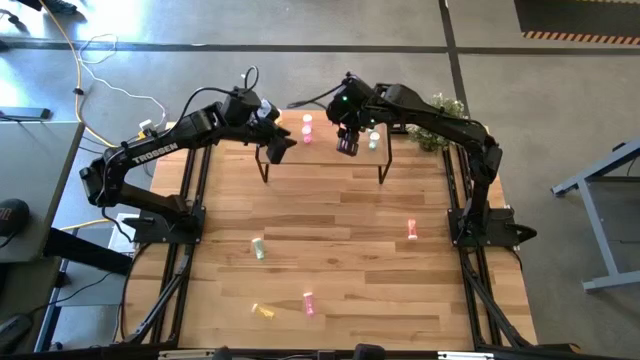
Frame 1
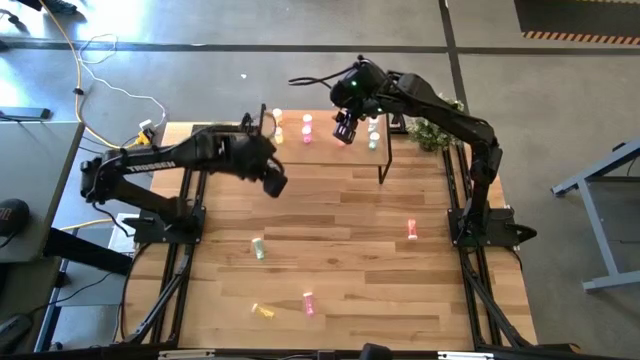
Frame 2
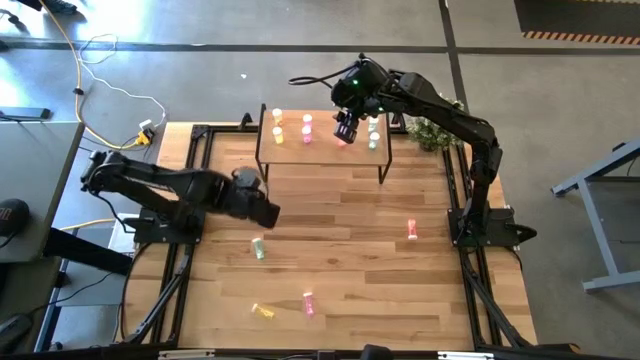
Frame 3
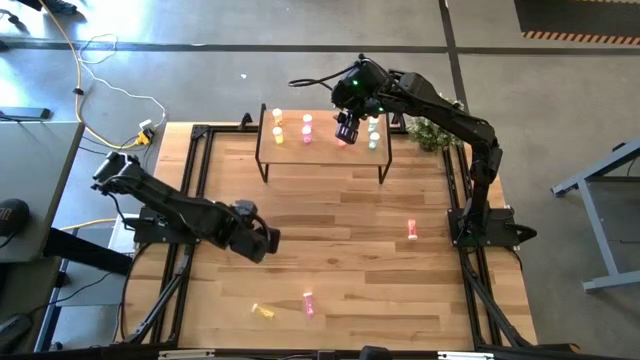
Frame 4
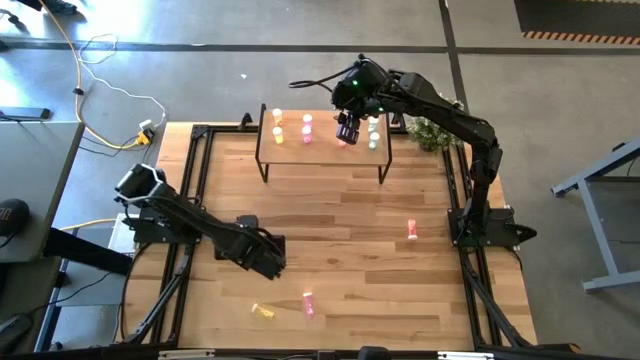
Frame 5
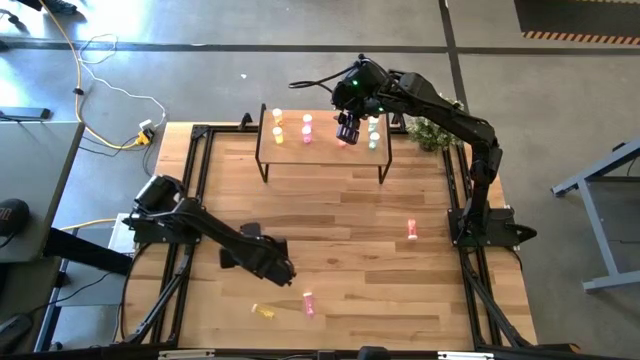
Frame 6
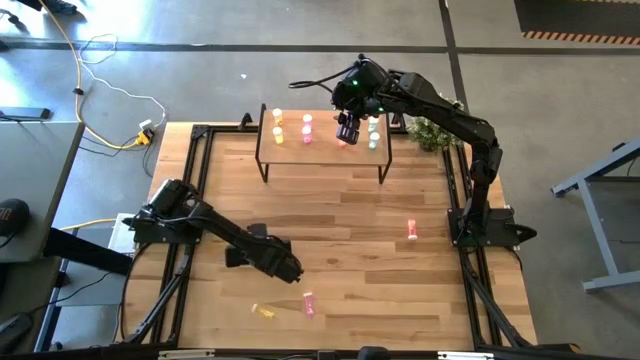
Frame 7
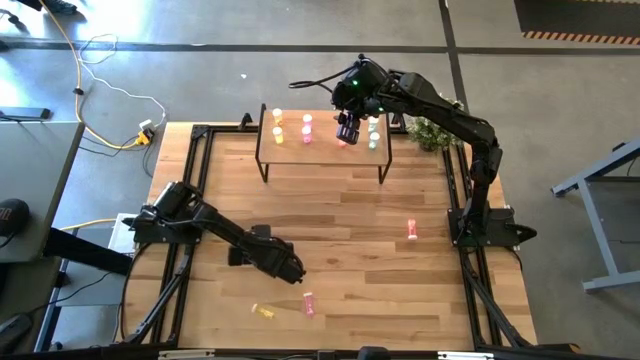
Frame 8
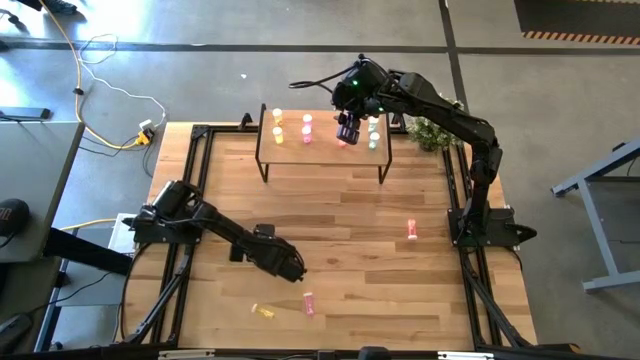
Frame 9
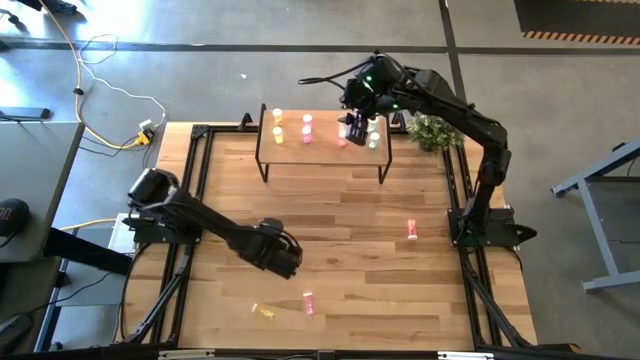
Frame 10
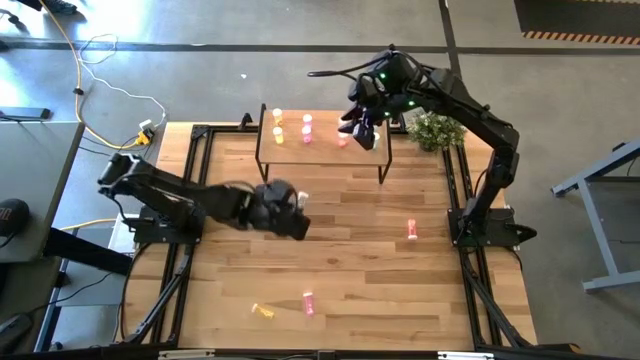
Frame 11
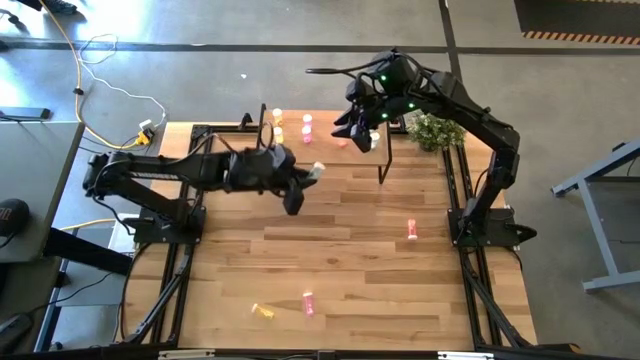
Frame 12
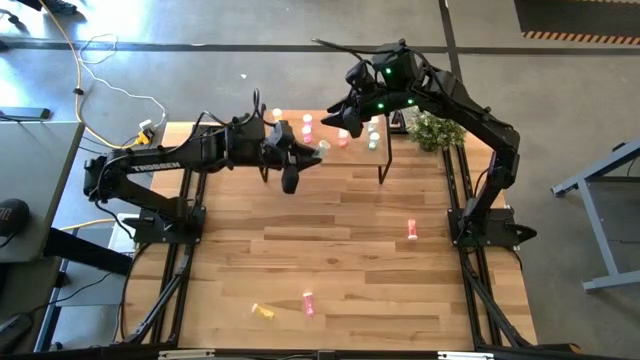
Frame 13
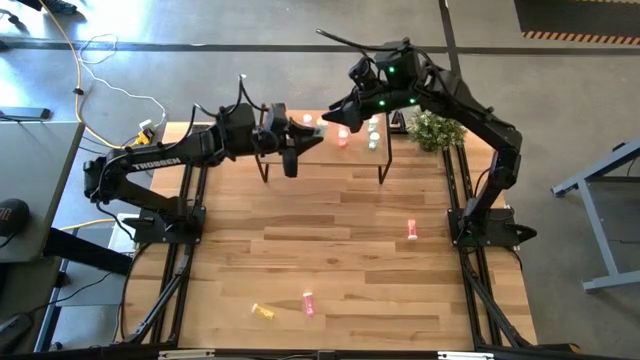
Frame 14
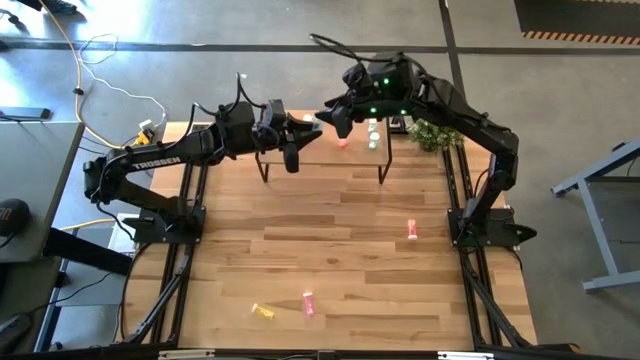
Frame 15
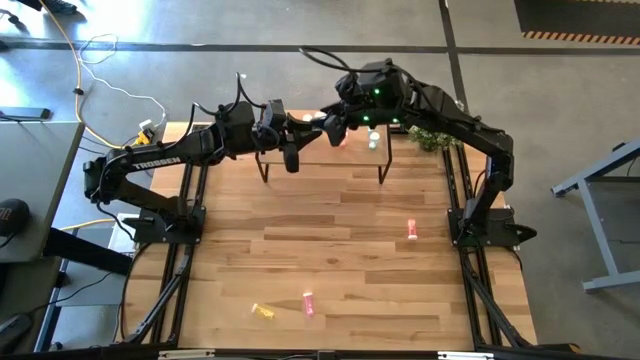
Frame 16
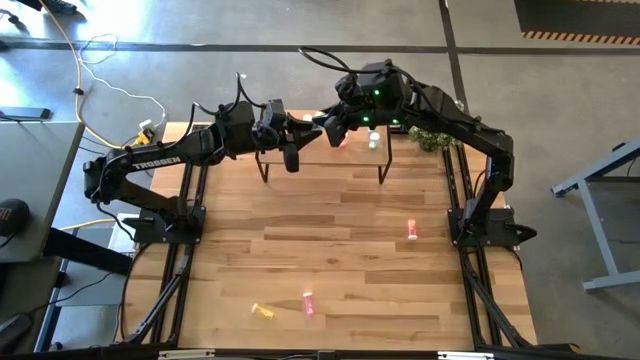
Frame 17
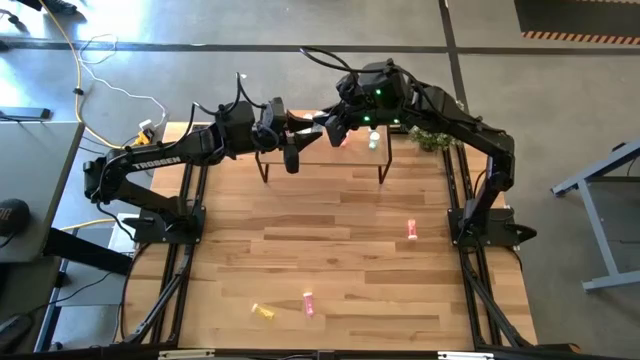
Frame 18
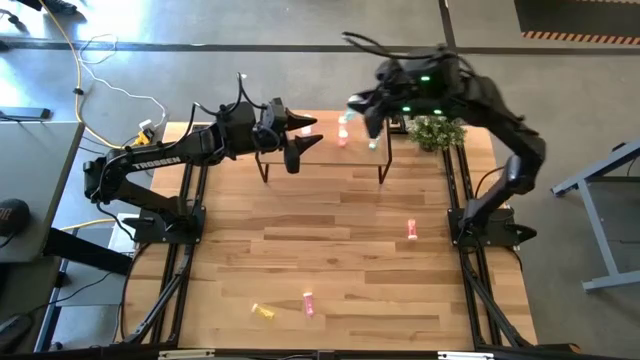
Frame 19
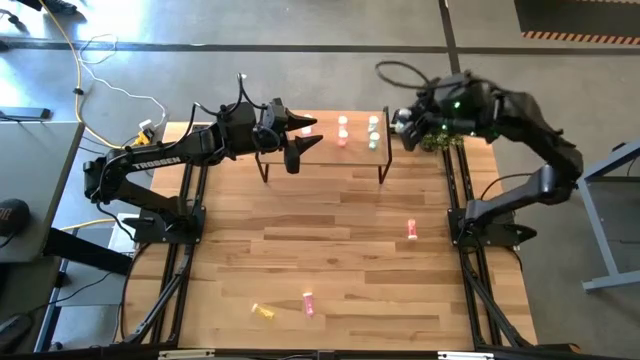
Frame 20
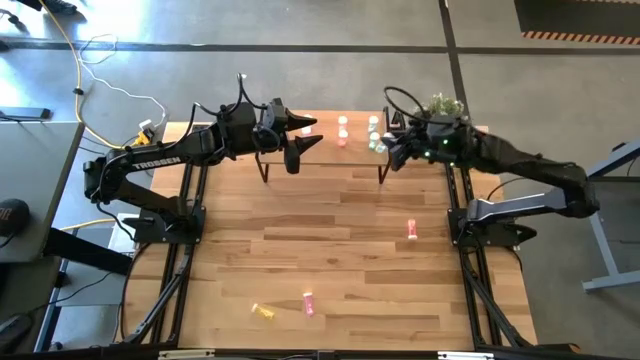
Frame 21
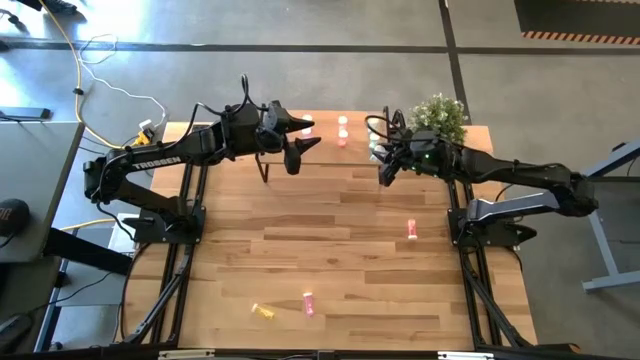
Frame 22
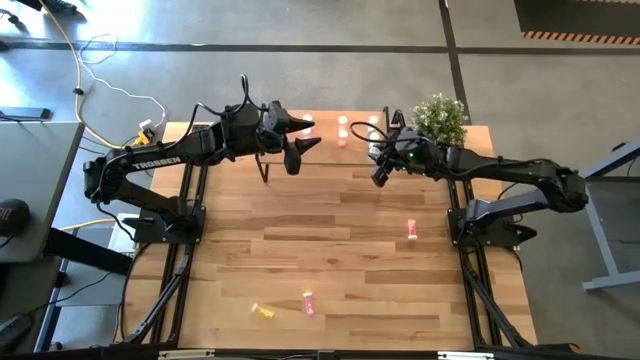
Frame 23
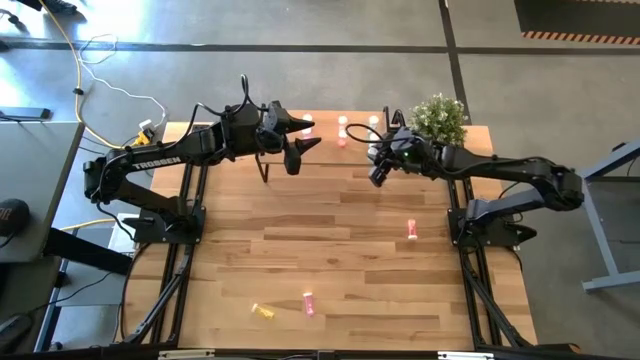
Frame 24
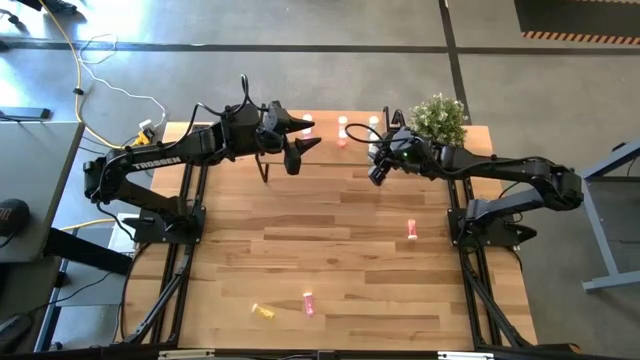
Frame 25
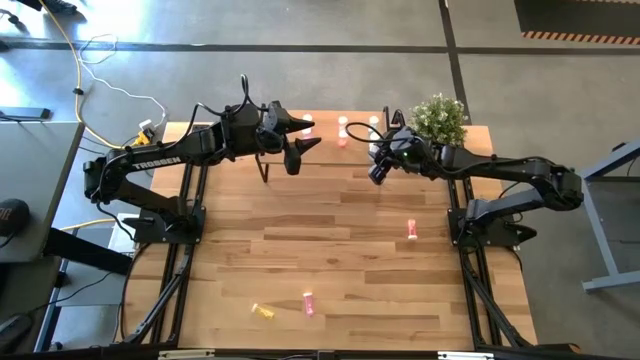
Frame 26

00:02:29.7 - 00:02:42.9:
Task: Pick and place medicine bottles onto shelf by color
Put the blue pill bottle on the shelf aligned with other blue pill bottles

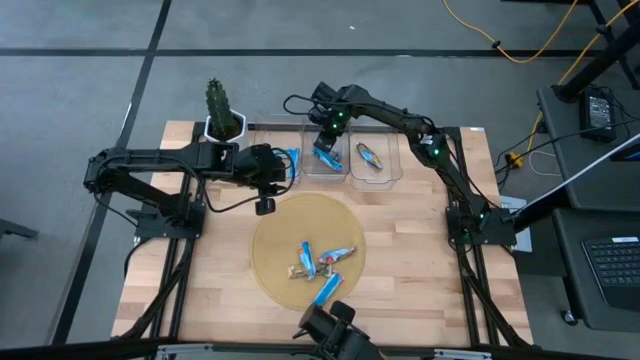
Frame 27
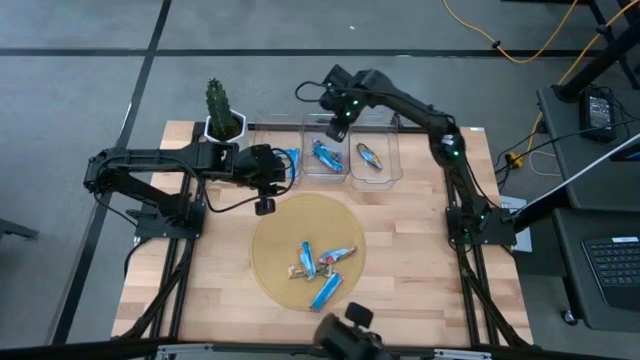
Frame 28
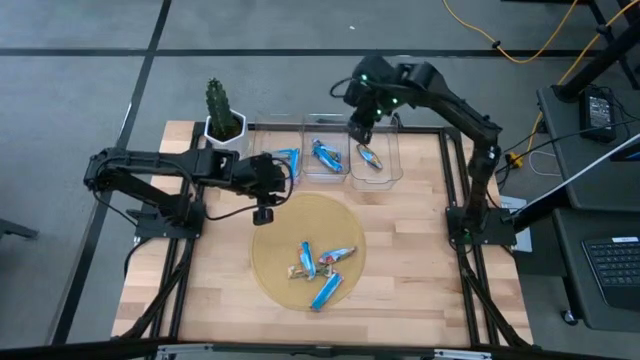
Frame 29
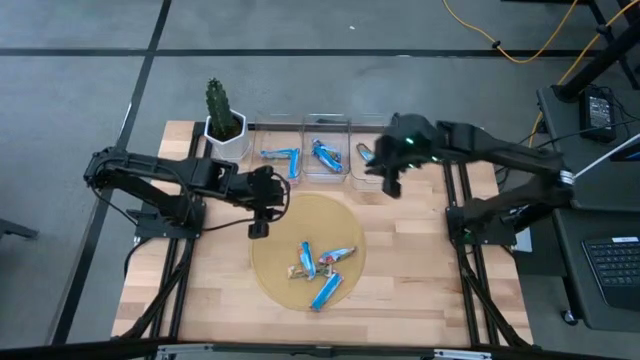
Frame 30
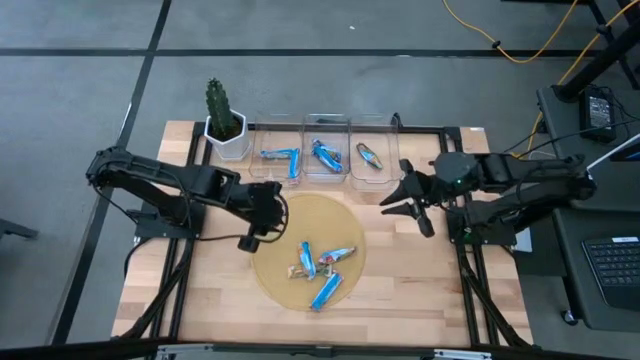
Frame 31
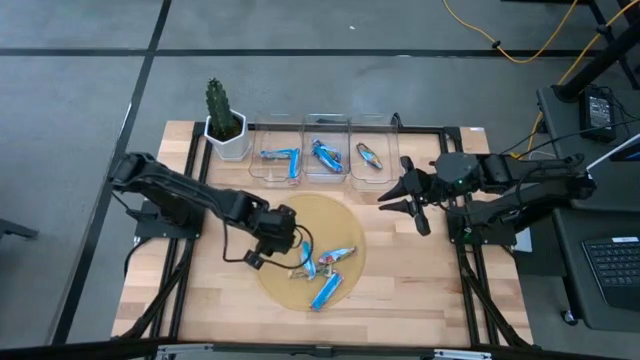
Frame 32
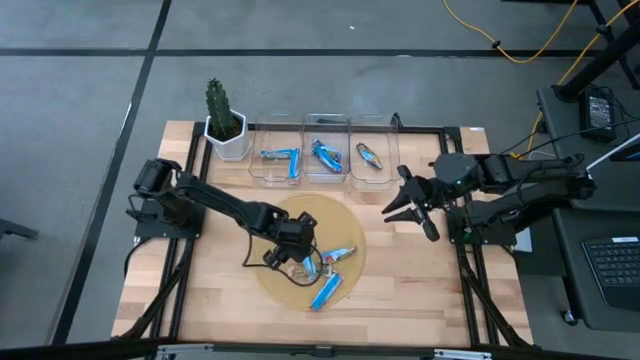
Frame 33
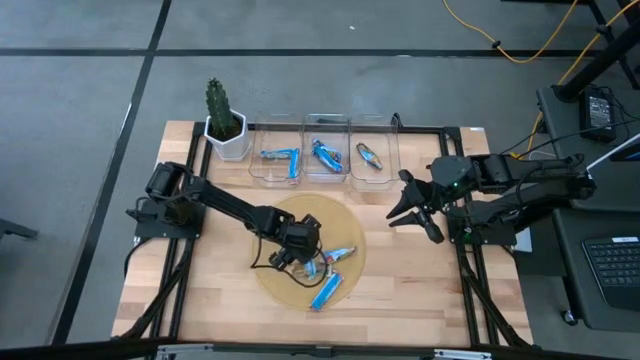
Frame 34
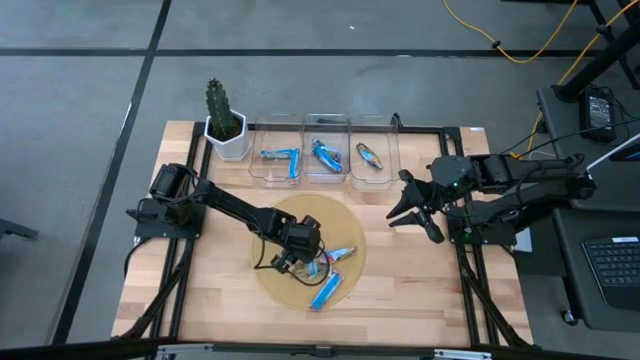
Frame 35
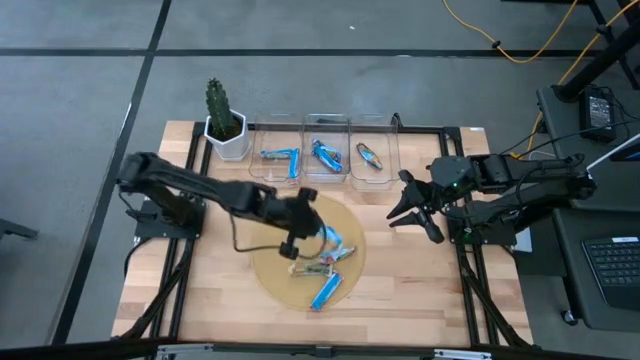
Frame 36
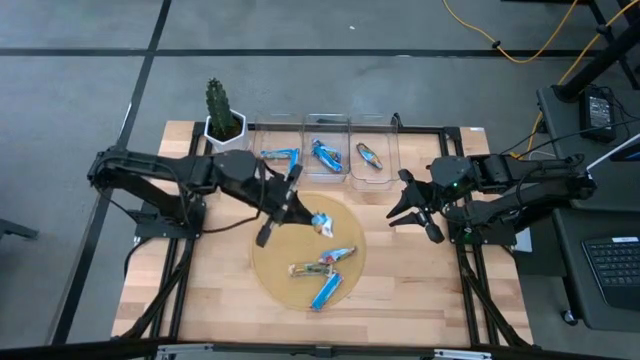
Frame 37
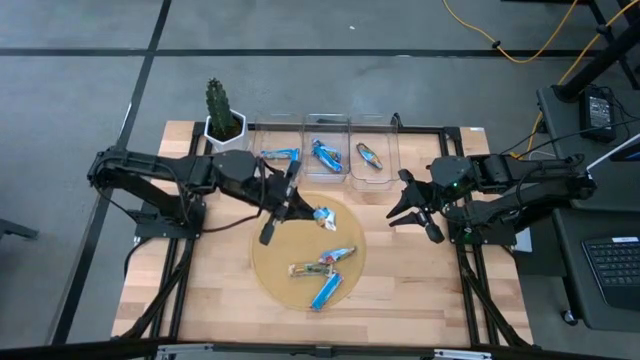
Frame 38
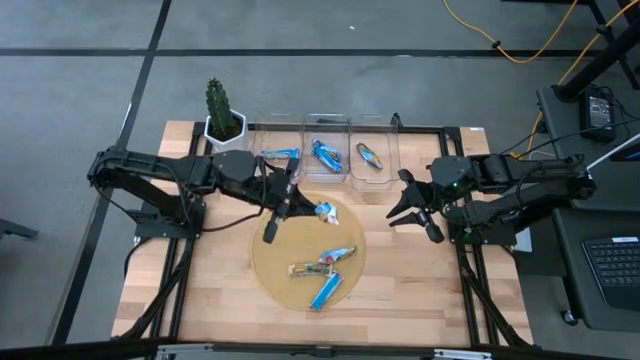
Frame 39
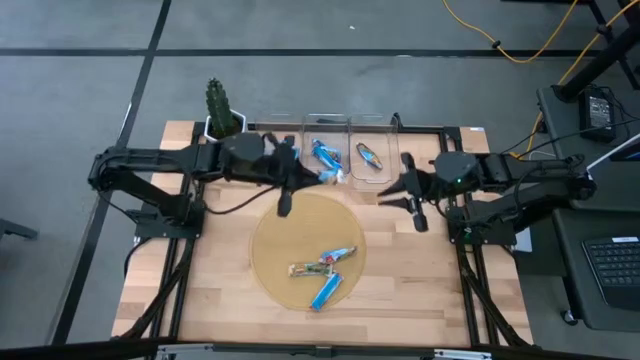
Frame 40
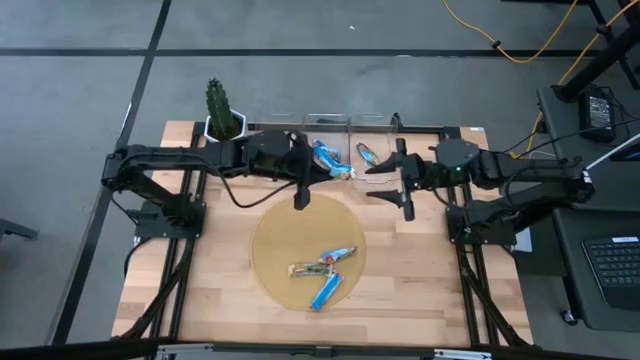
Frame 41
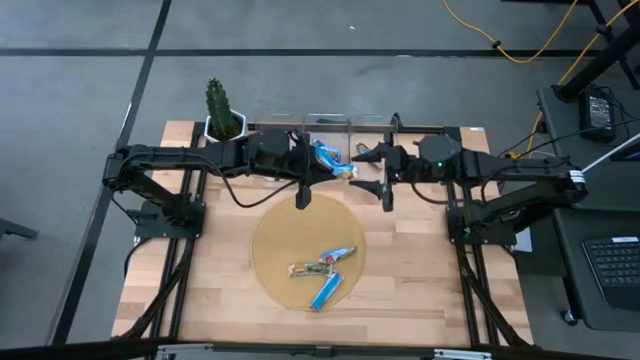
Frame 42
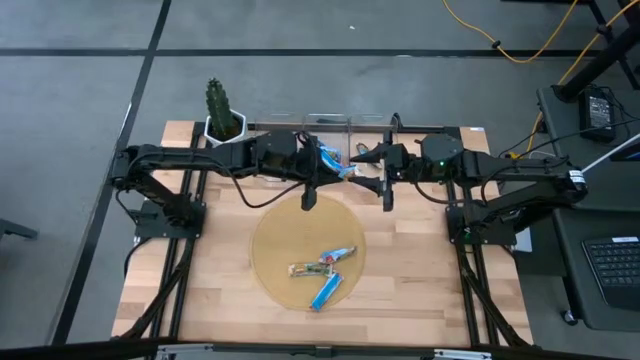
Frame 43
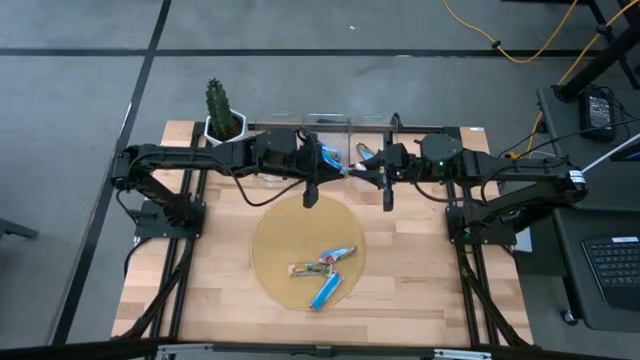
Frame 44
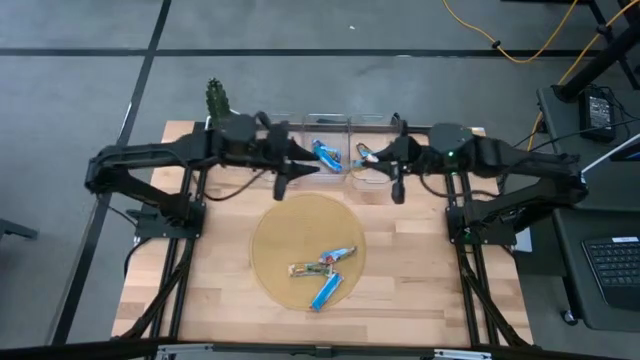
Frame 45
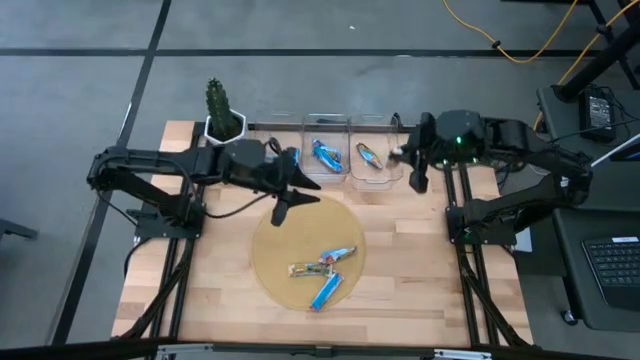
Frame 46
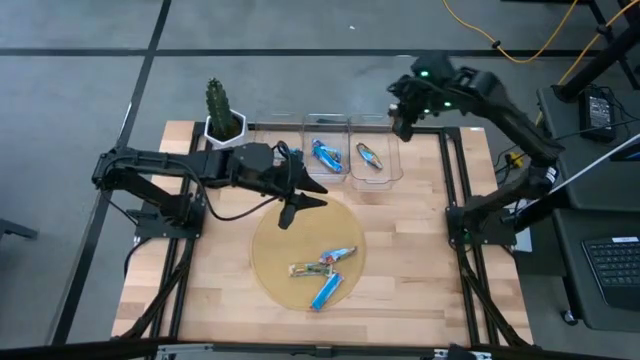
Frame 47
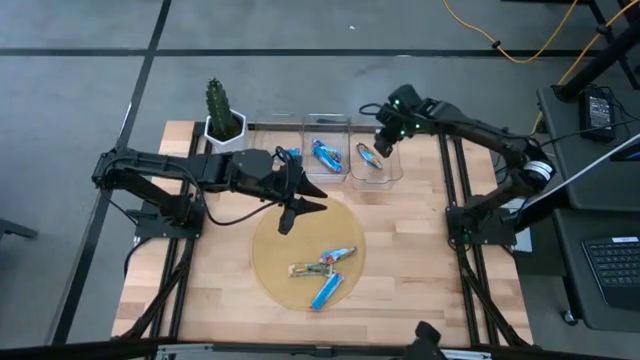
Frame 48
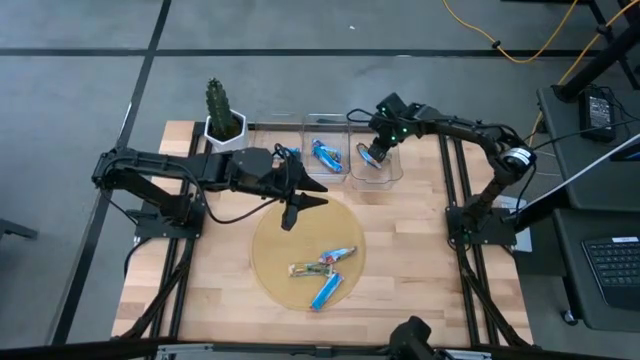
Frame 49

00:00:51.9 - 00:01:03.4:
Task: Pick and place Granola Bars by type
Put the orange granola bar into the right transparent bin
